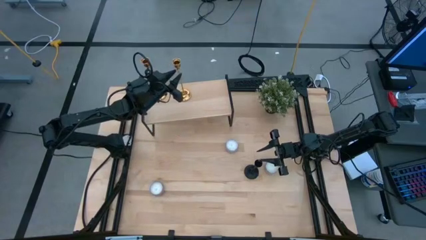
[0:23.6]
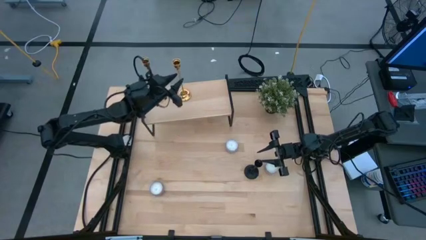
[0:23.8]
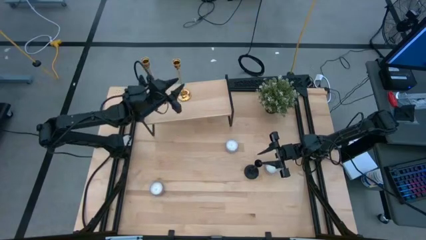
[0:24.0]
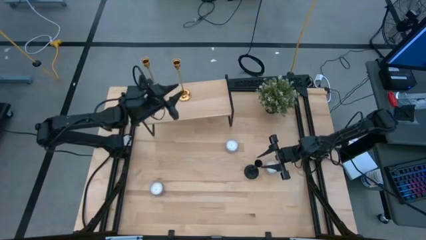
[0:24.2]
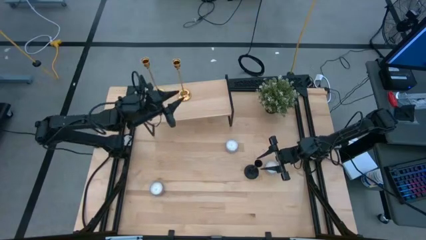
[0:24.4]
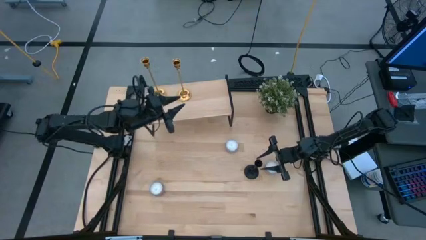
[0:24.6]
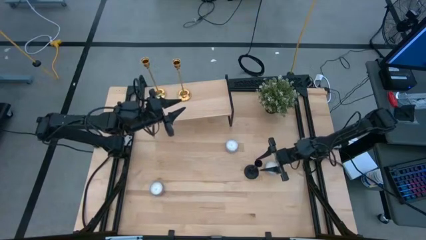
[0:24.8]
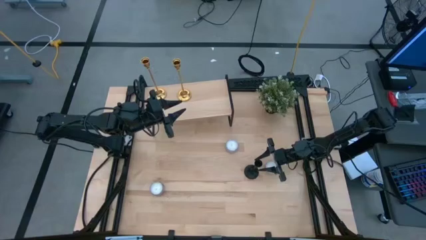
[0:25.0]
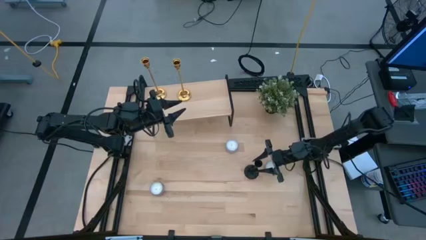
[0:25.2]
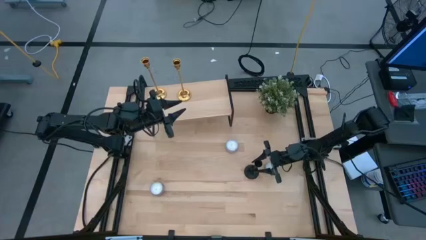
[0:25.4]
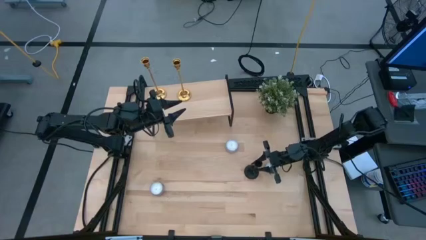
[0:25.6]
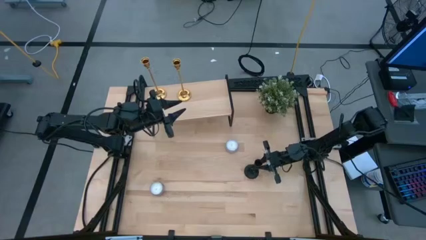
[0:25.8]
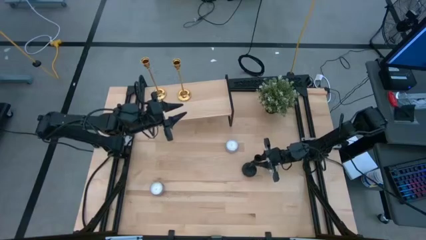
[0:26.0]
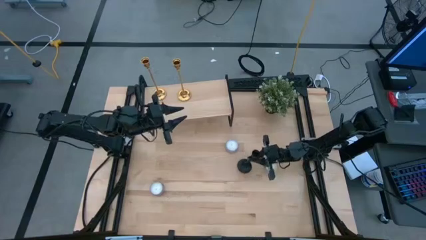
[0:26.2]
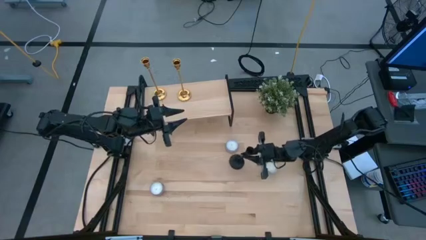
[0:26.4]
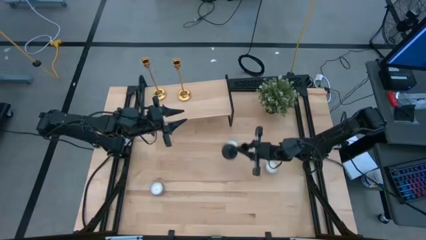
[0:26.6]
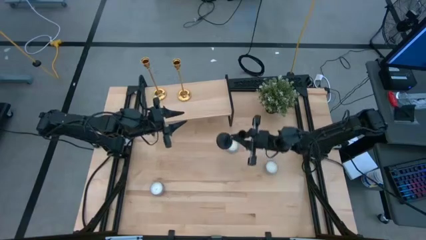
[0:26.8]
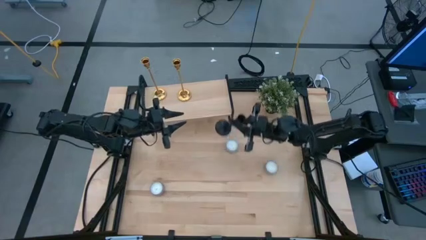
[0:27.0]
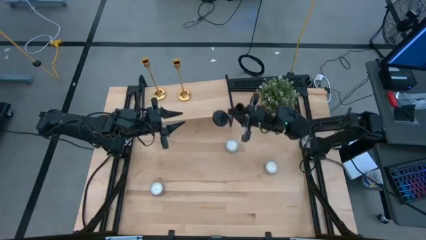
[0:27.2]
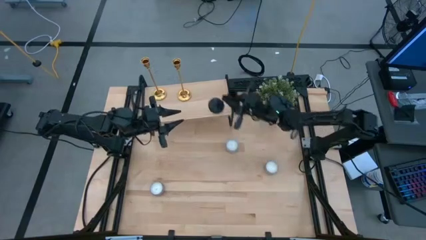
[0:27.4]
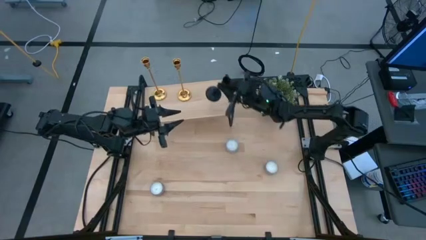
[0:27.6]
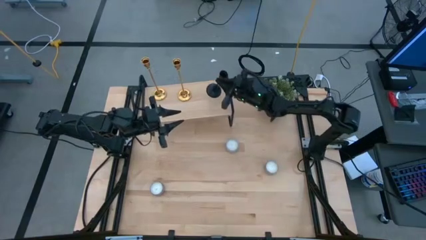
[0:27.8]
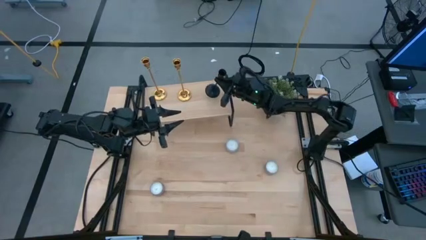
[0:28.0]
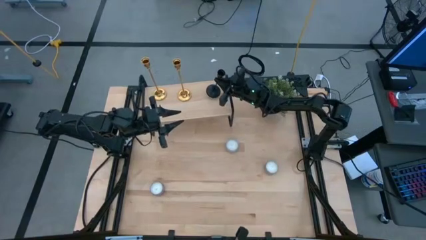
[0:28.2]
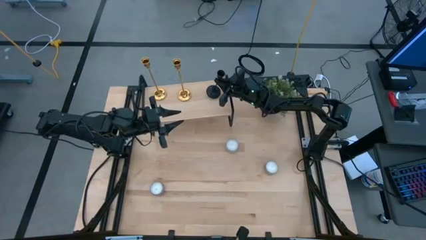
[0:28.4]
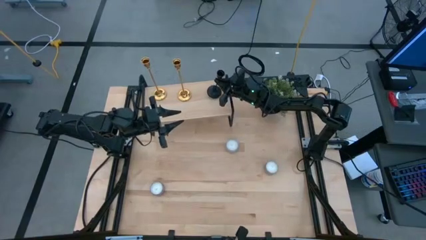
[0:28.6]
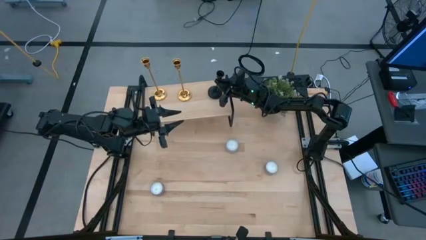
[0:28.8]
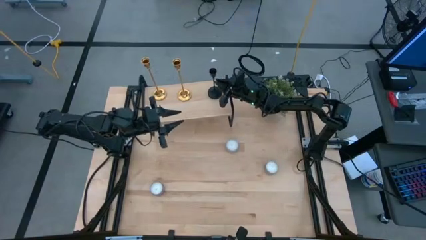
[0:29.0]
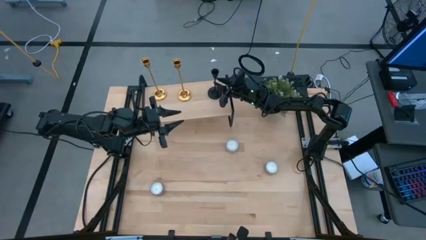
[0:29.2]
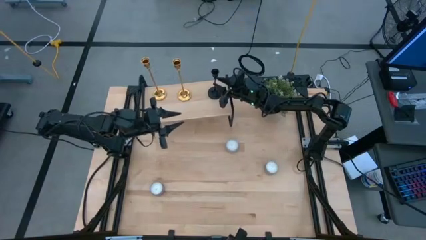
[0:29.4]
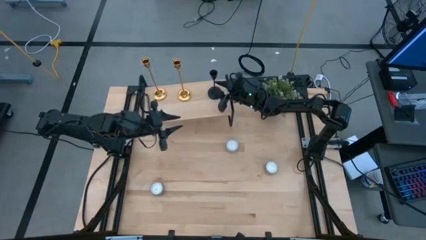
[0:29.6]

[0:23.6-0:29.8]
Task: Pick & Place candle stick holders
Put the black candle holder on the shelf

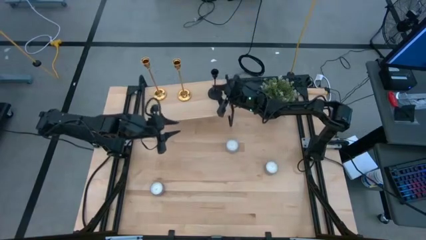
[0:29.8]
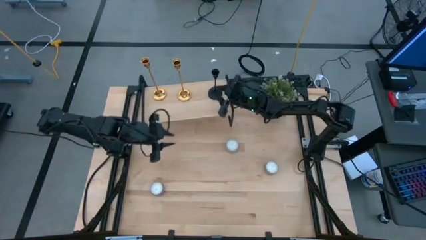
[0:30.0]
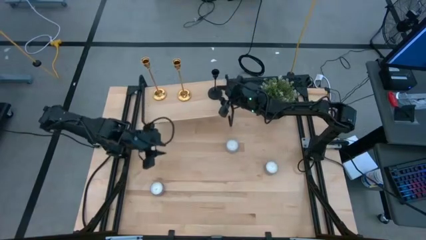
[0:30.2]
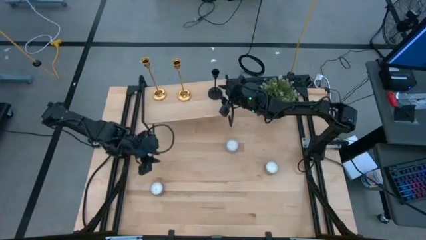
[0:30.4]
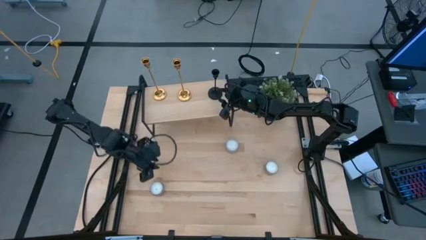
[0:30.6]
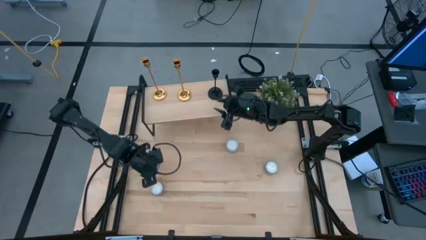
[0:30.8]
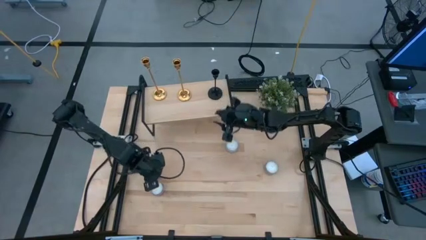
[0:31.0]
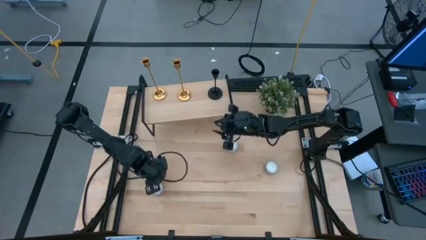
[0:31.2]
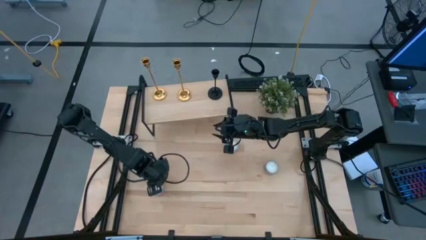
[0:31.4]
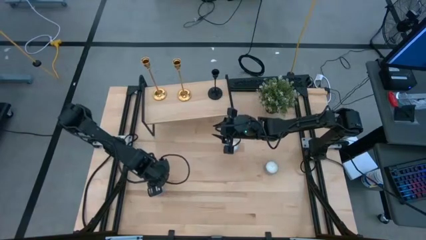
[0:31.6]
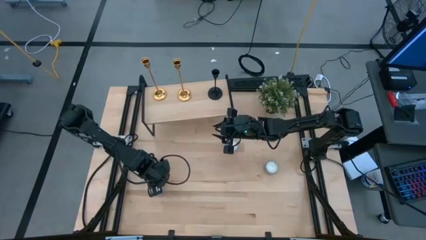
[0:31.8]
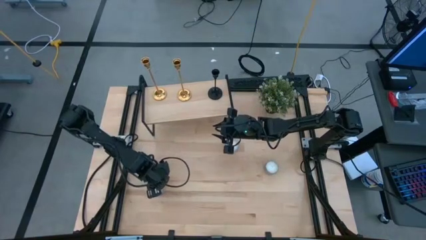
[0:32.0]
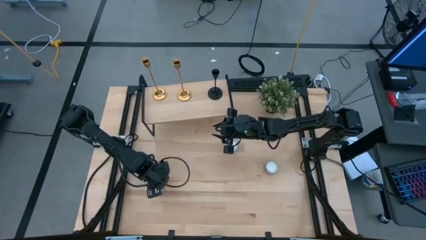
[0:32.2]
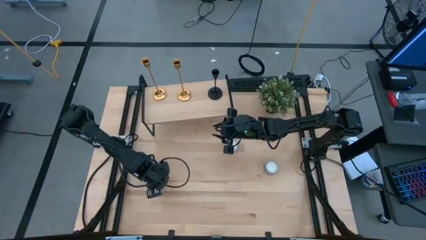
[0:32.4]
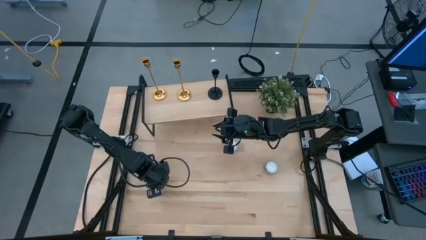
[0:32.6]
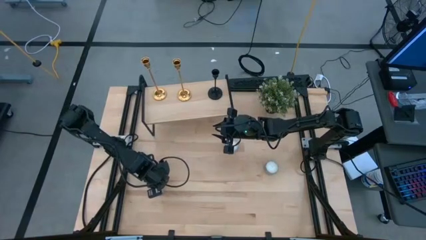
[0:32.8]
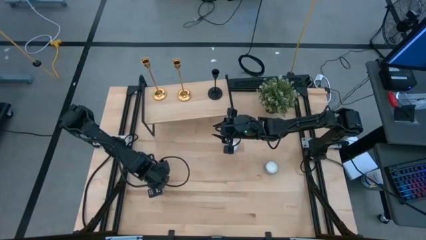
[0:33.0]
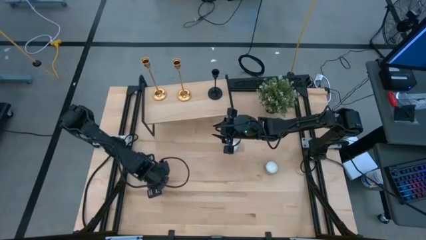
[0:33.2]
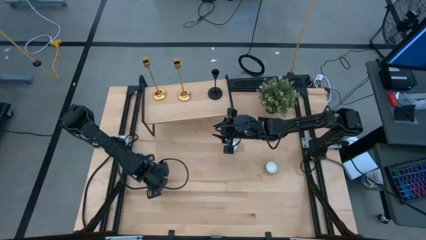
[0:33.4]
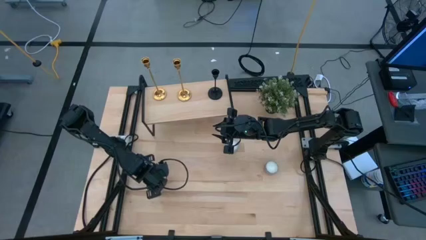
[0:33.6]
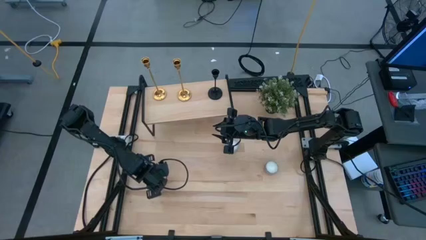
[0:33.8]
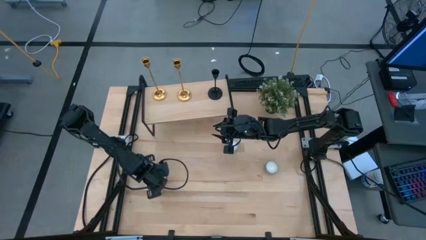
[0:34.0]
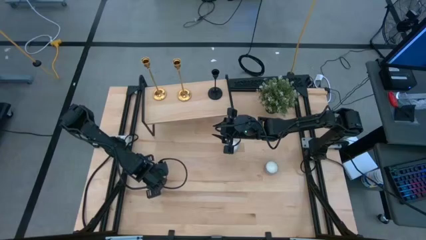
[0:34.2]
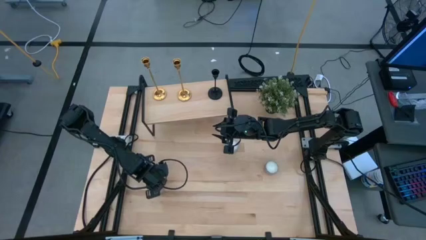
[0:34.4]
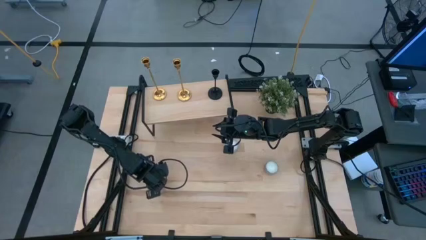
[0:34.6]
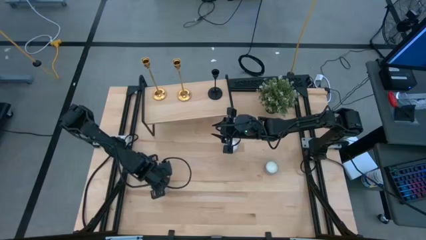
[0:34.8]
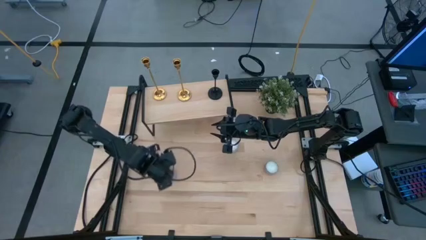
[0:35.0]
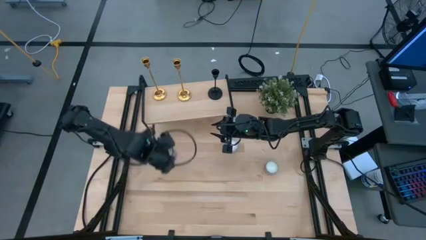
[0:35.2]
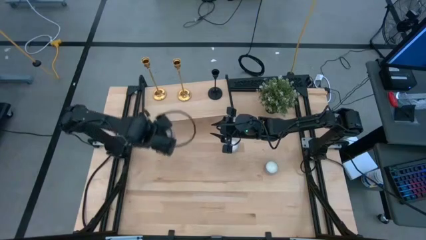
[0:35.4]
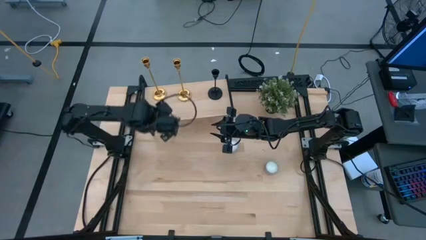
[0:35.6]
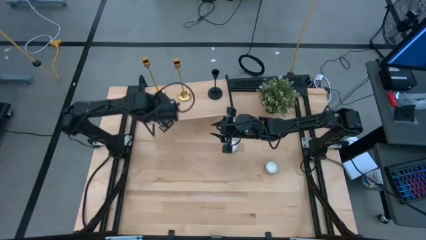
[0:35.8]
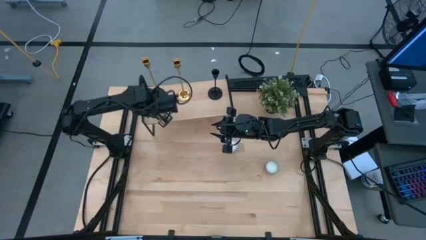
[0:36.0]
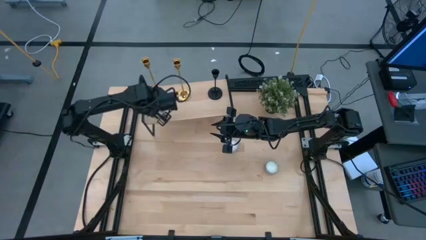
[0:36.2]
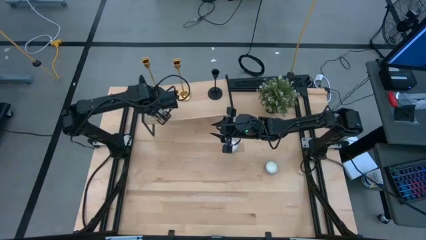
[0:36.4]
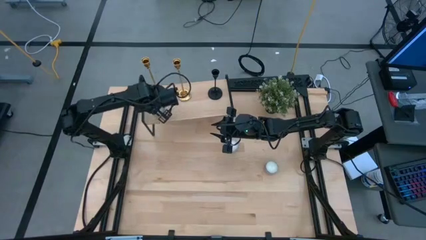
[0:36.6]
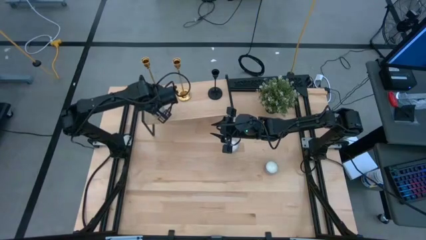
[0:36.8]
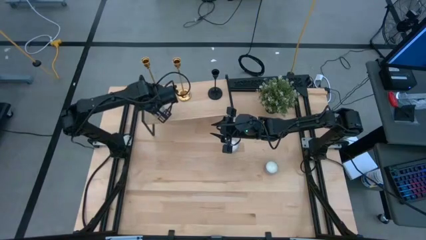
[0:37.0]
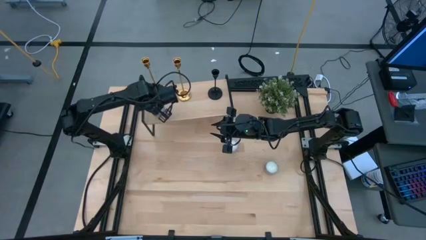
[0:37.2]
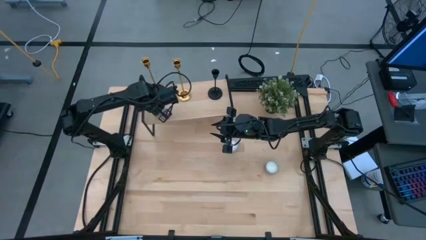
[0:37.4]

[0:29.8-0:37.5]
Put the gray and red scented candle on the shelf
